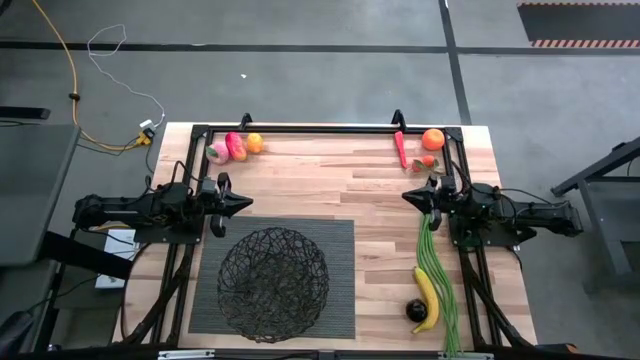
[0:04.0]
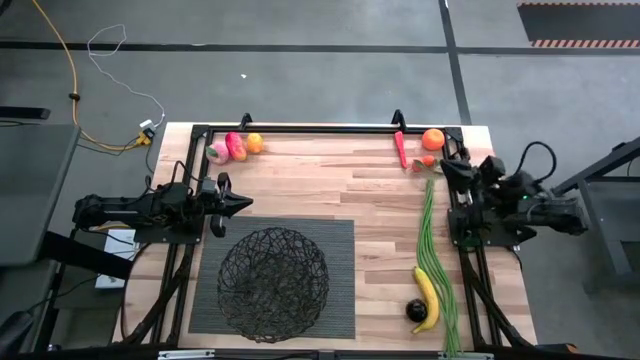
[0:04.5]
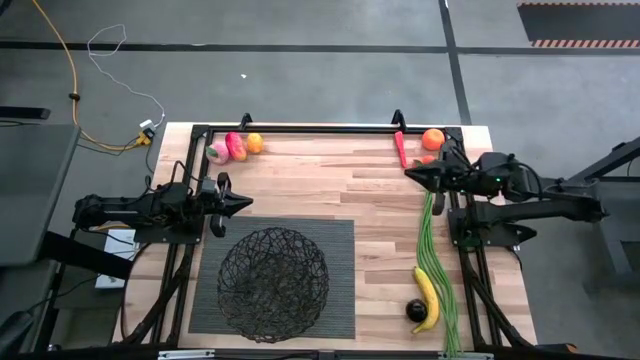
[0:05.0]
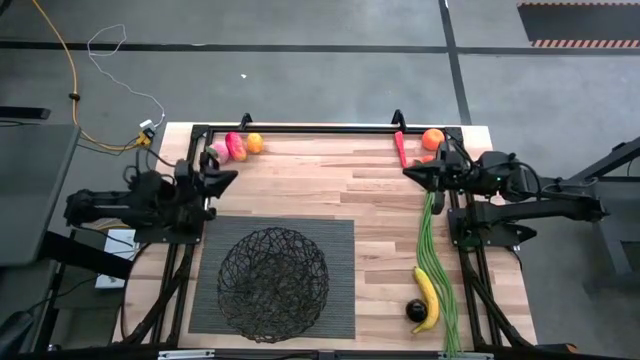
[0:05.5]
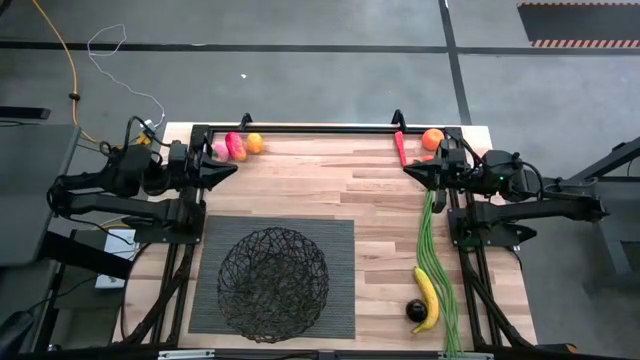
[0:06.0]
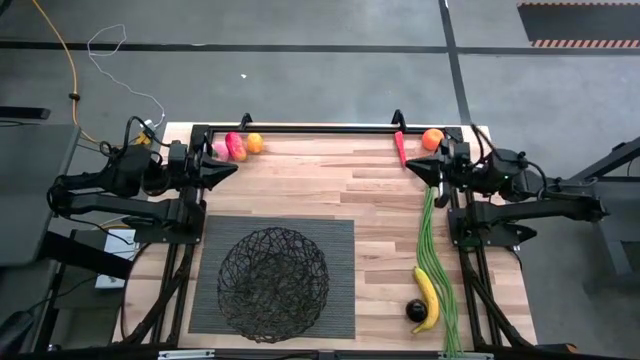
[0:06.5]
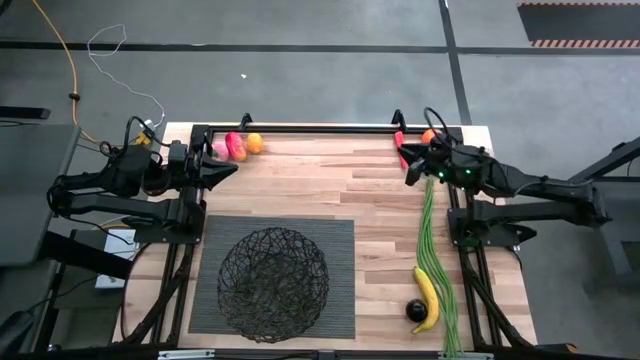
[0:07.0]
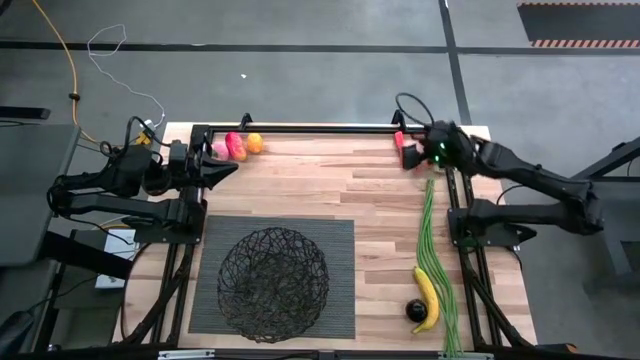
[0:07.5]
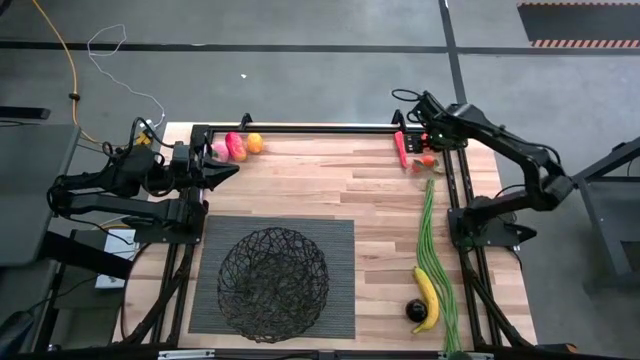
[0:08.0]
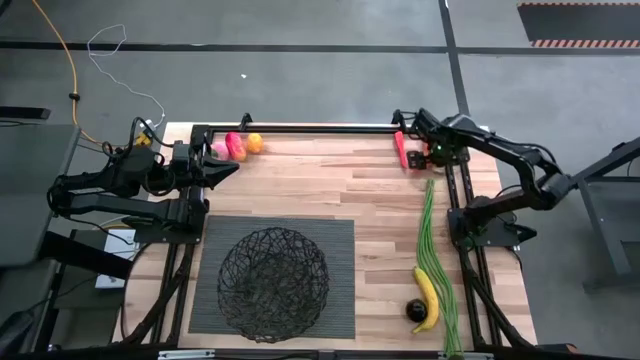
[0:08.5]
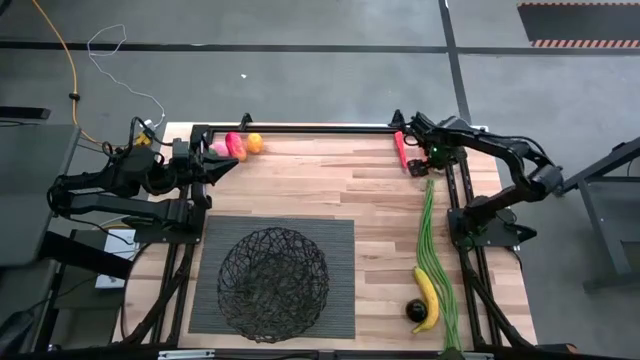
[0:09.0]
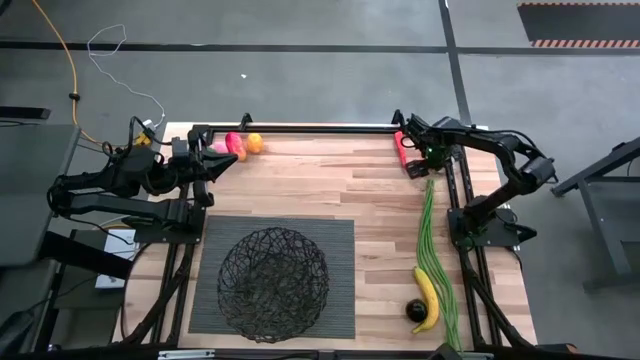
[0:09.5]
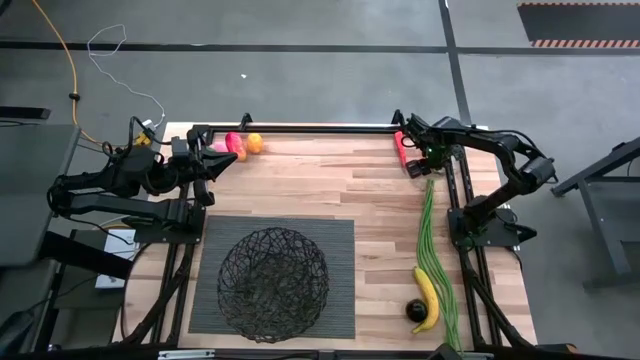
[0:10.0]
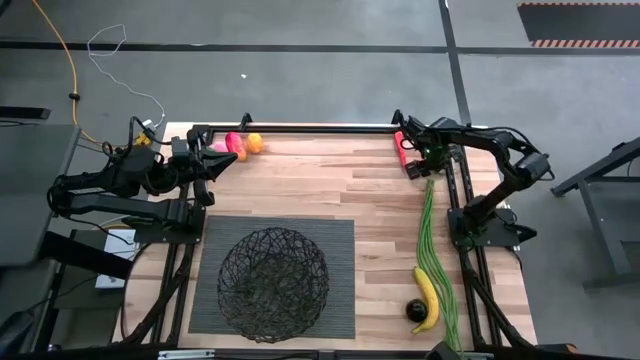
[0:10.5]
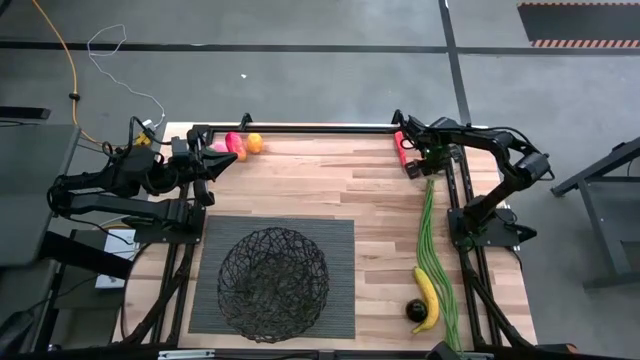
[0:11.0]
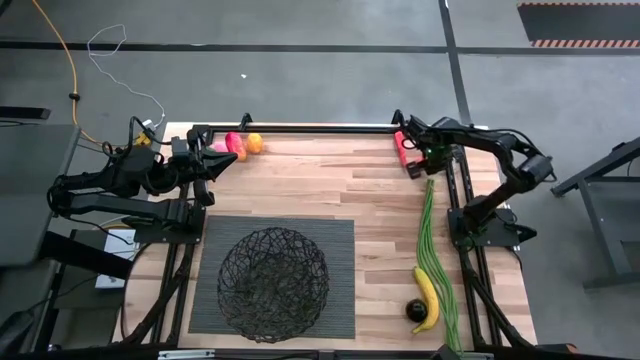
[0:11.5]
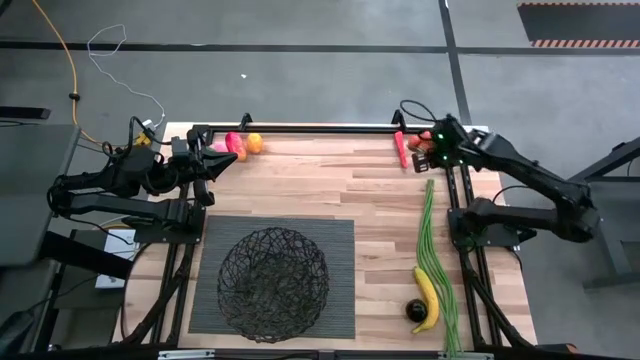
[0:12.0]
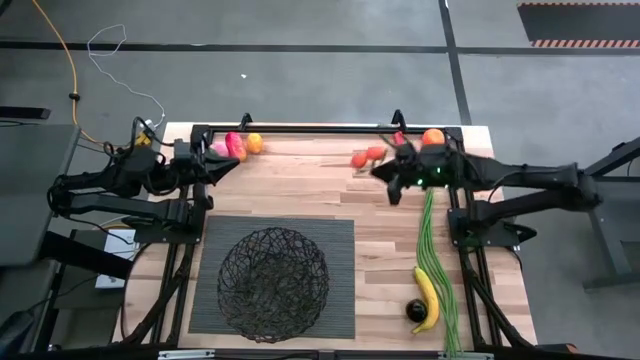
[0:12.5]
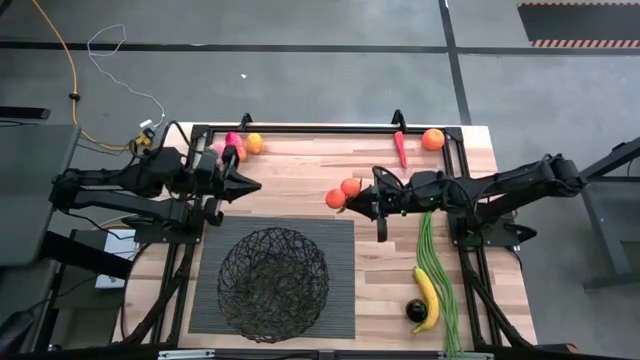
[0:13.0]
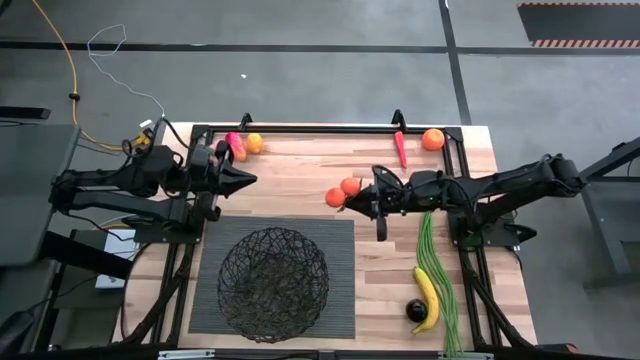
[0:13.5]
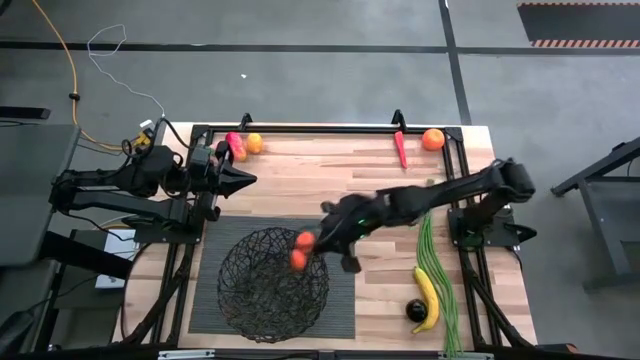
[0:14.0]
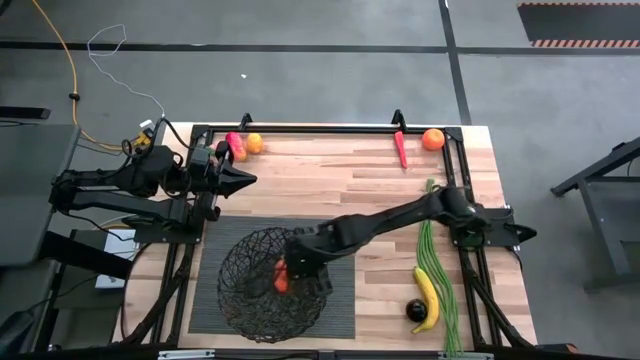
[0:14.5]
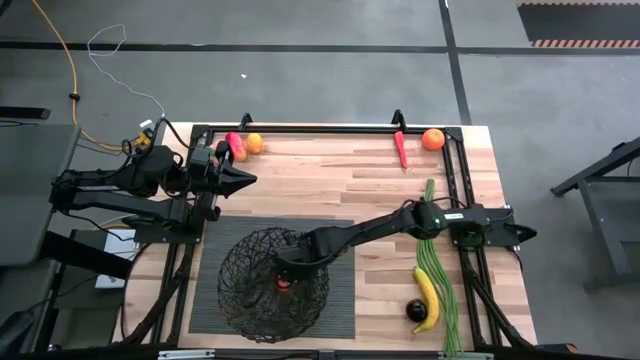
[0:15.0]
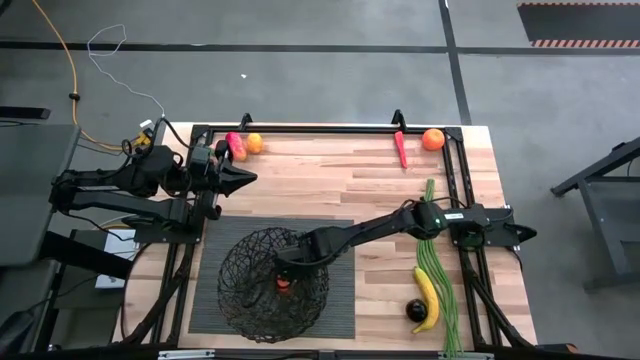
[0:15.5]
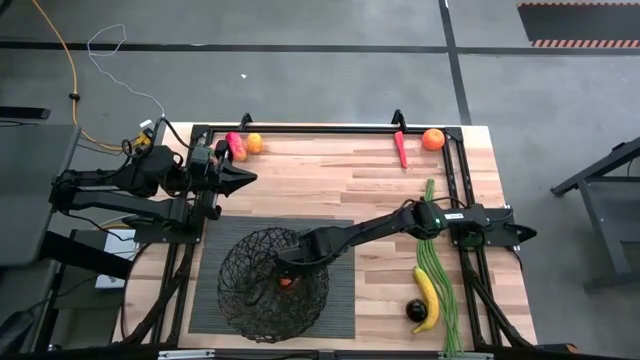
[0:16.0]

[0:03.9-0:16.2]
Task: Build produce basket
Put the tangerines into the black wire basket

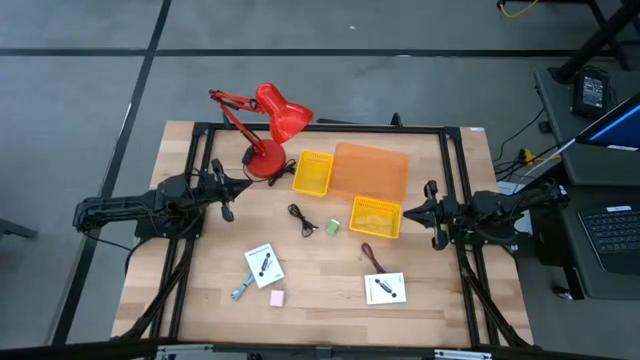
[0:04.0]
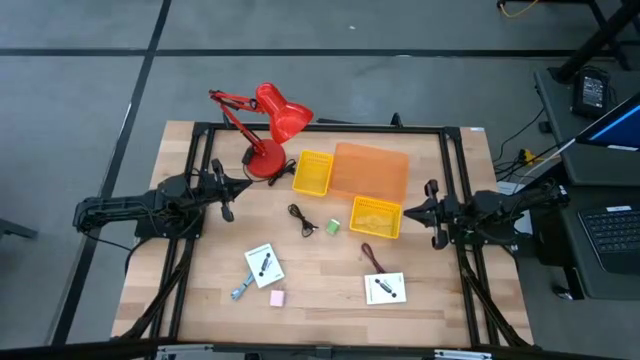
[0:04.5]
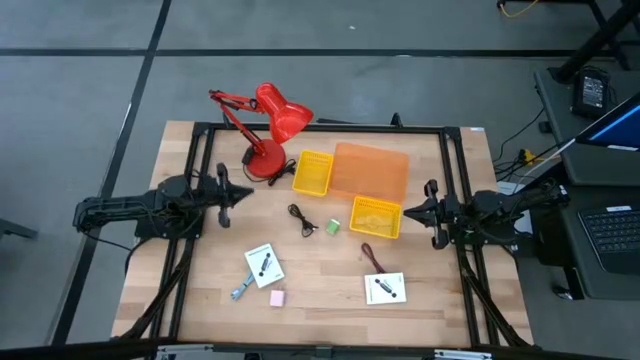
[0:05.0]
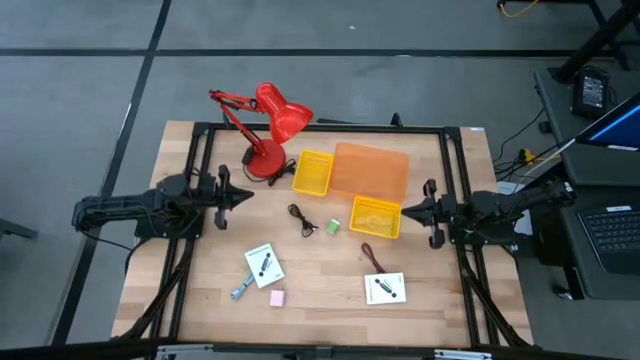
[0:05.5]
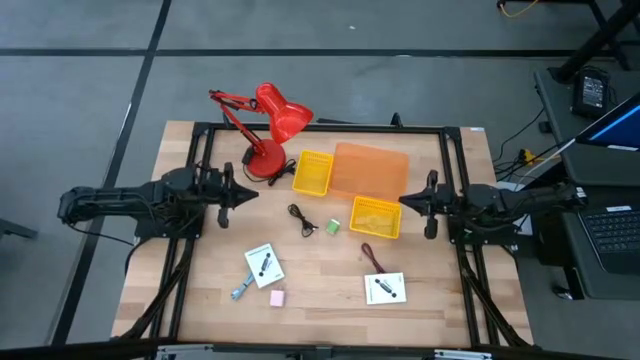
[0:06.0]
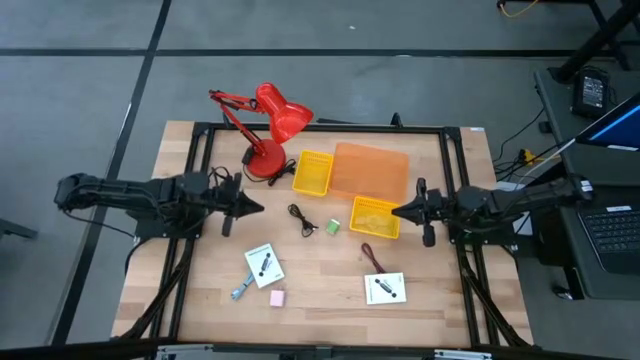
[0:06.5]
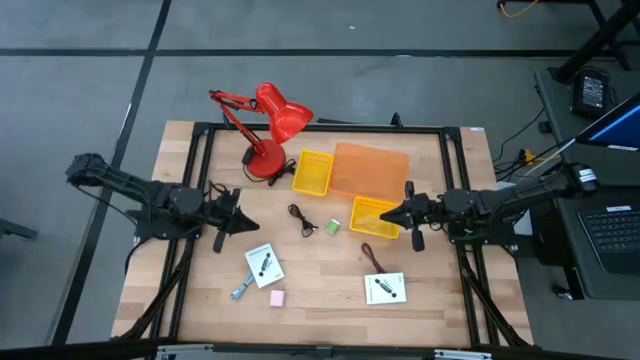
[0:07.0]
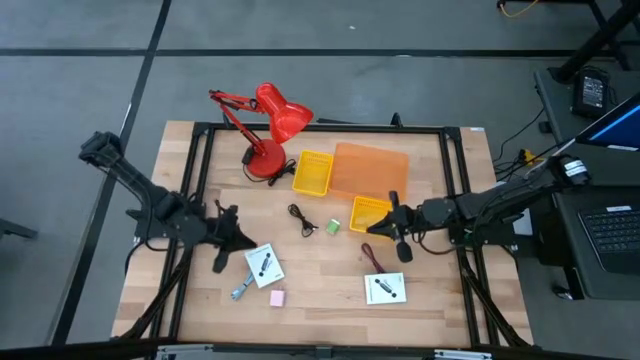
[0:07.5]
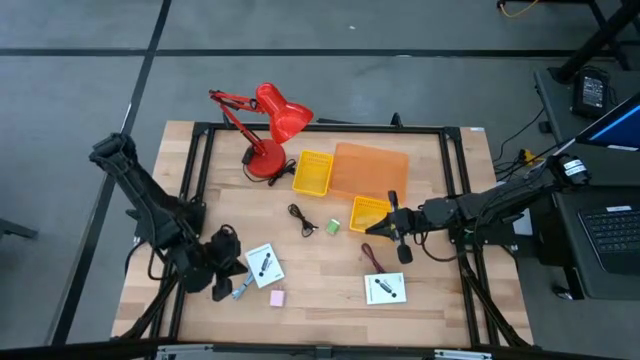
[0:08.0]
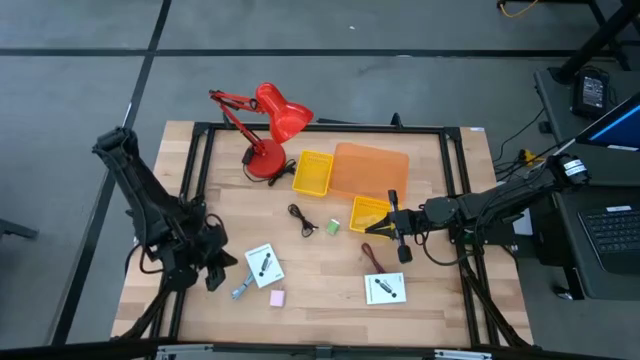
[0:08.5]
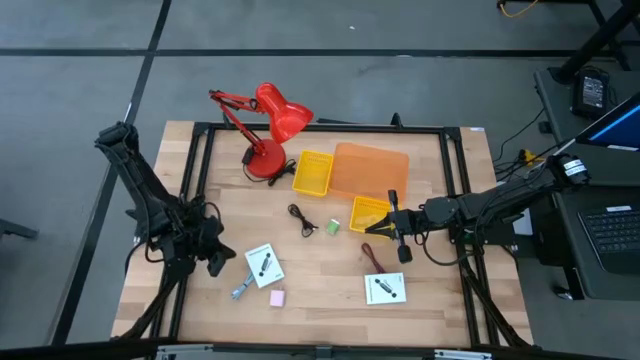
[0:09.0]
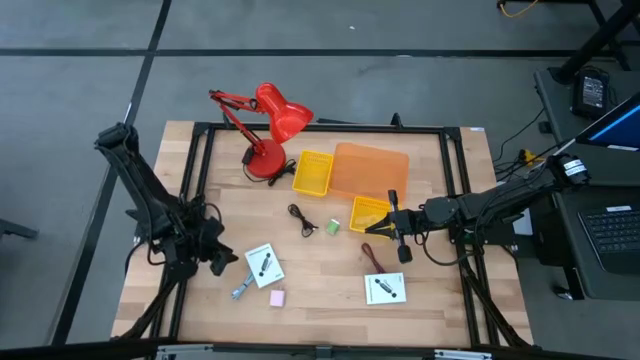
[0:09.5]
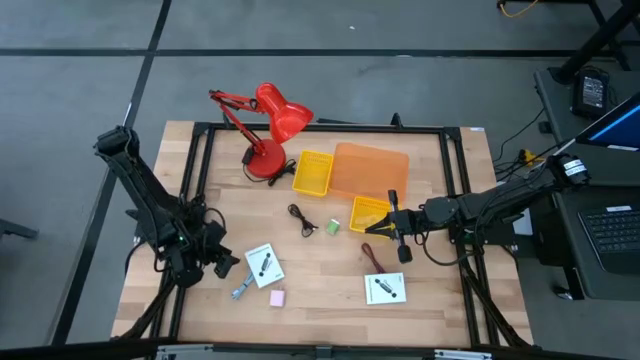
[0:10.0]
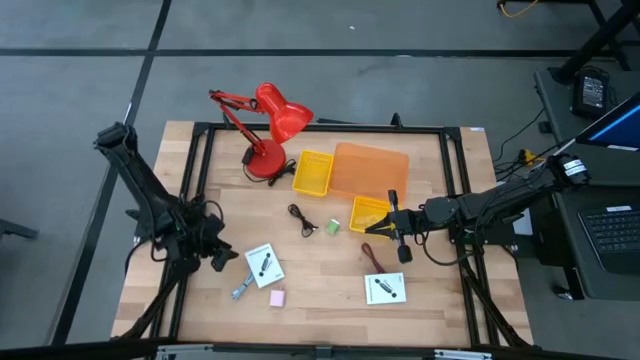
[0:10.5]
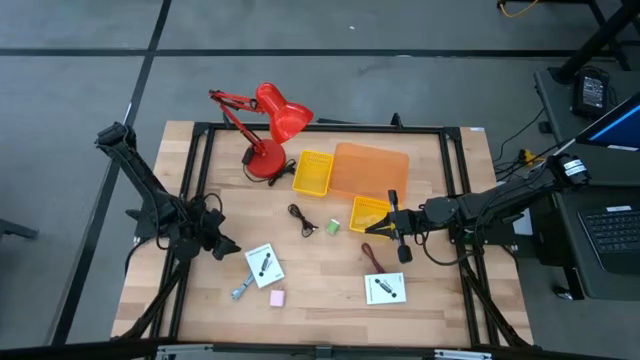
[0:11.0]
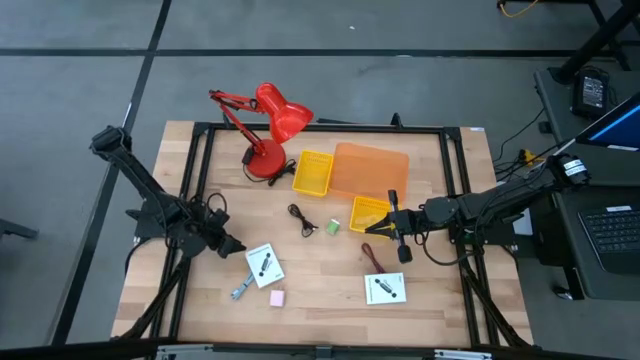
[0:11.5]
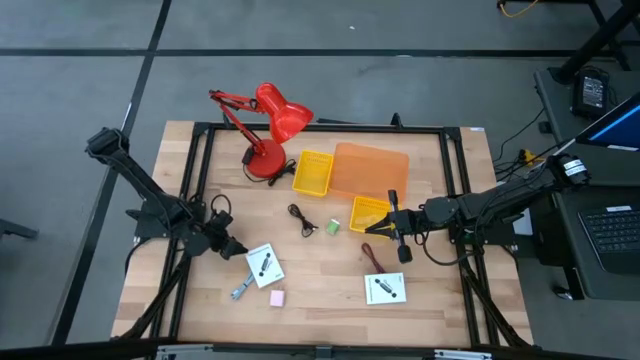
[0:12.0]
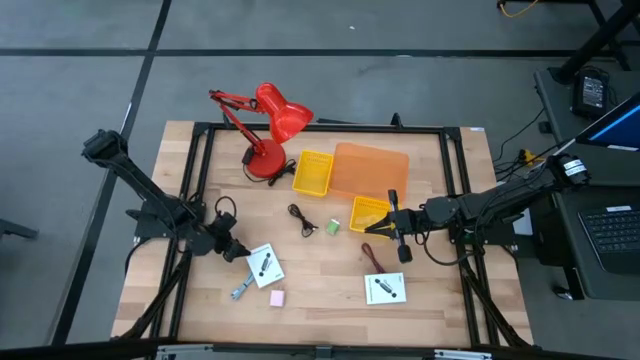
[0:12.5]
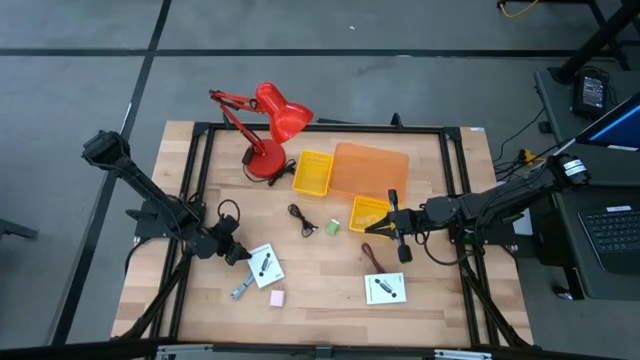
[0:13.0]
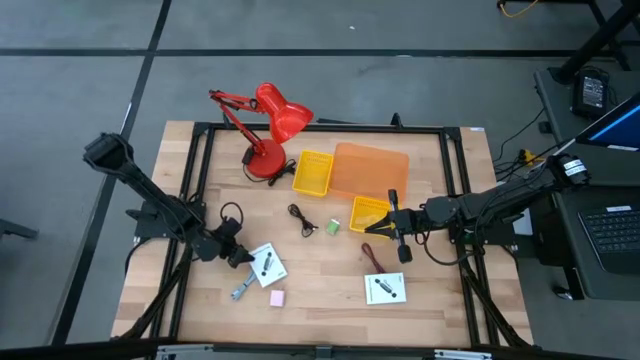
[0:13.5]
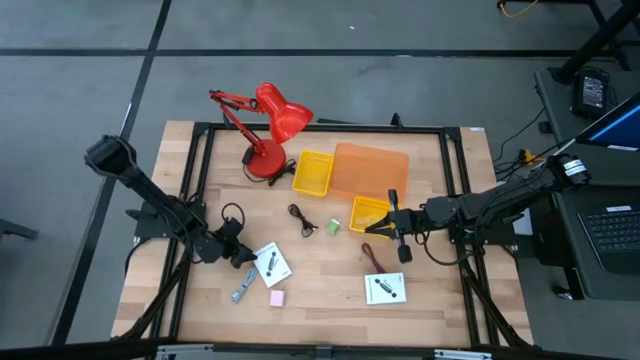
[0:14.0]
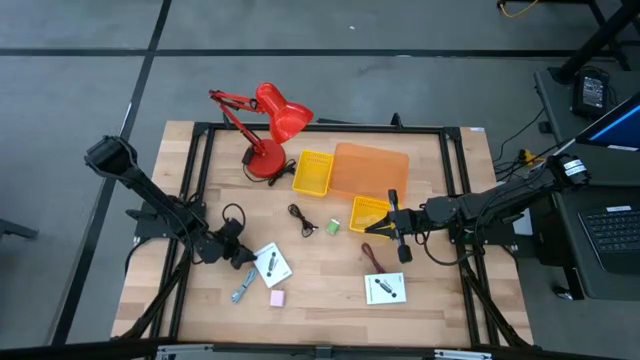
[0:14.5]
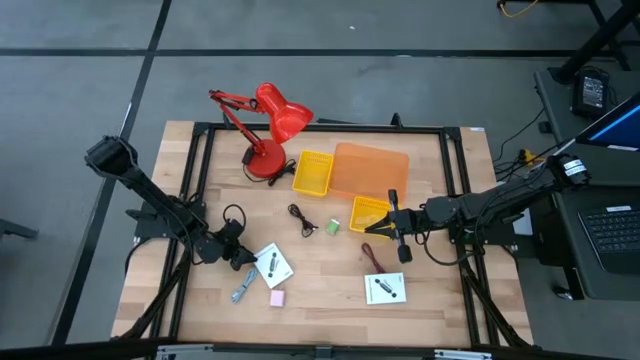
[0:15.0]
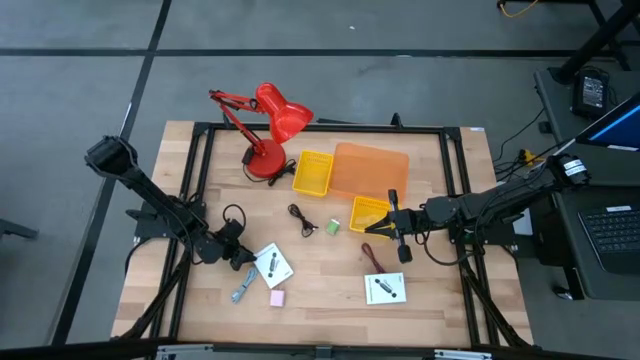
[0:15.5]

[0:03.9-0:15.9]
Task: Pick and place items into bin
Put the left white box into the orange bin
